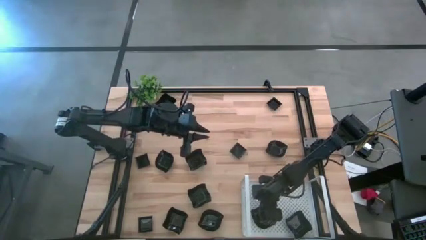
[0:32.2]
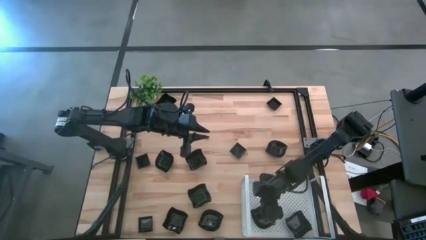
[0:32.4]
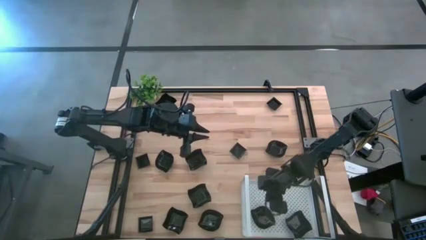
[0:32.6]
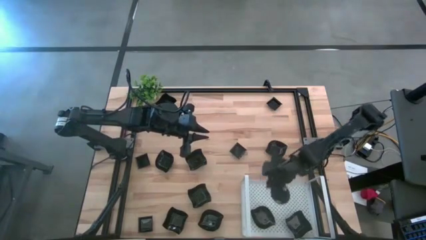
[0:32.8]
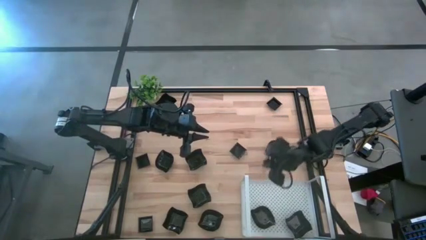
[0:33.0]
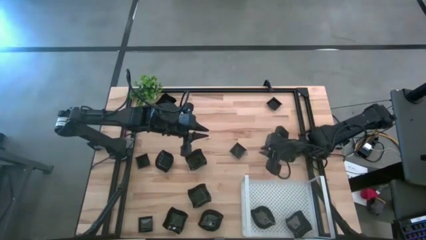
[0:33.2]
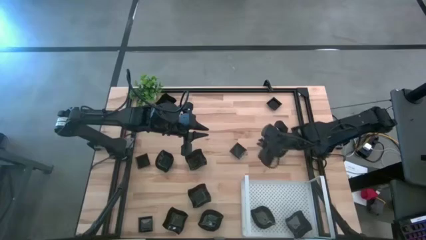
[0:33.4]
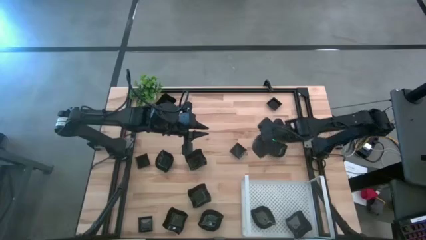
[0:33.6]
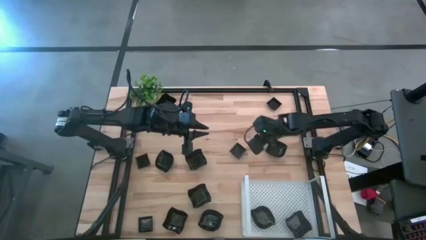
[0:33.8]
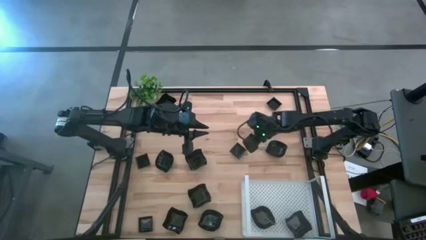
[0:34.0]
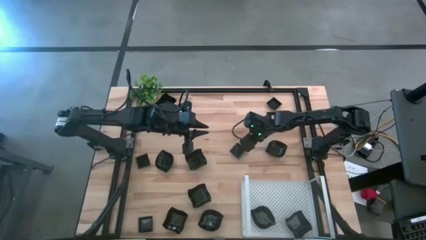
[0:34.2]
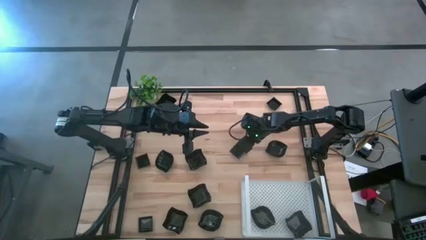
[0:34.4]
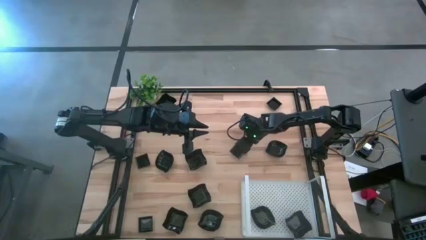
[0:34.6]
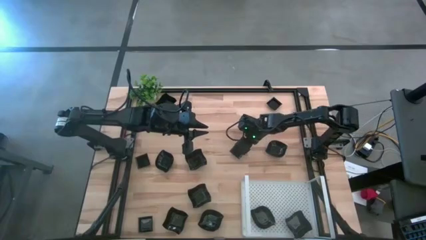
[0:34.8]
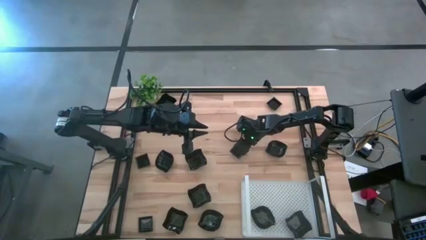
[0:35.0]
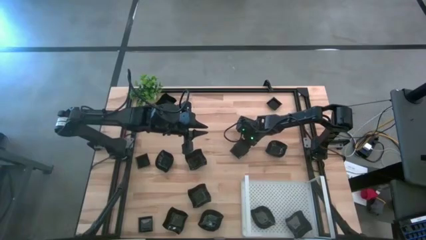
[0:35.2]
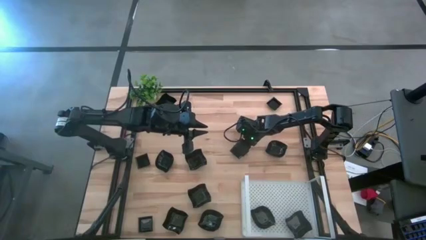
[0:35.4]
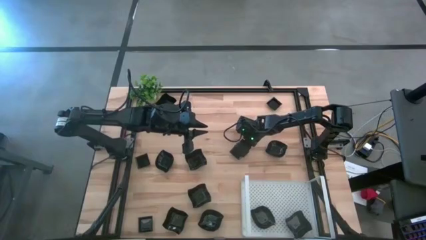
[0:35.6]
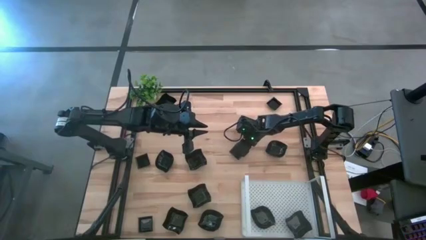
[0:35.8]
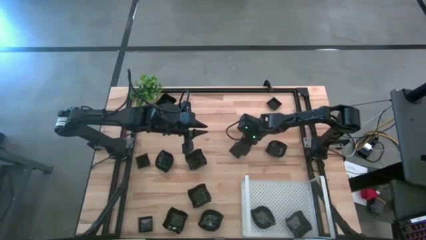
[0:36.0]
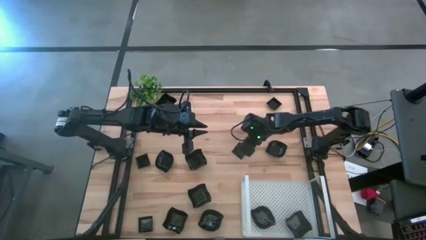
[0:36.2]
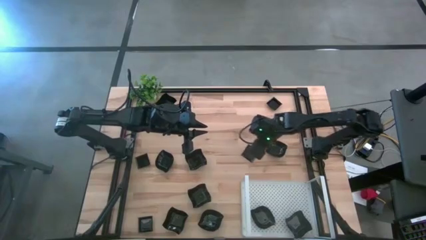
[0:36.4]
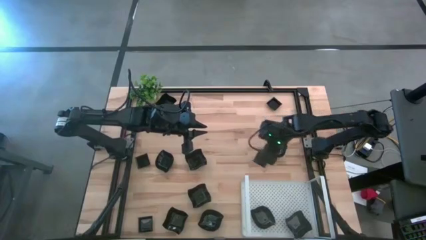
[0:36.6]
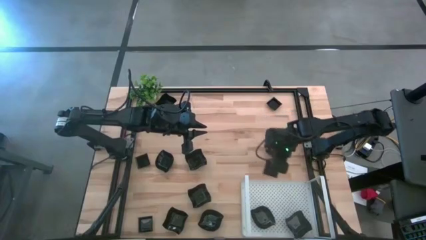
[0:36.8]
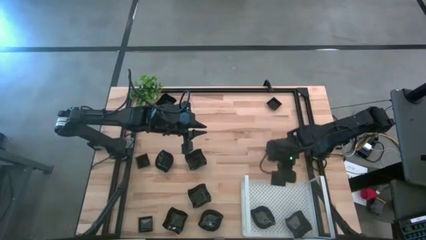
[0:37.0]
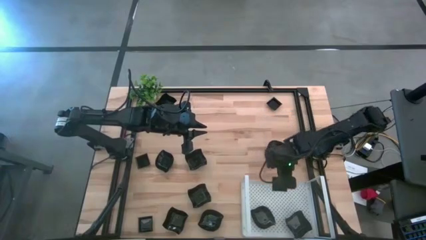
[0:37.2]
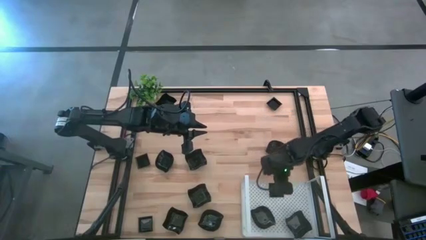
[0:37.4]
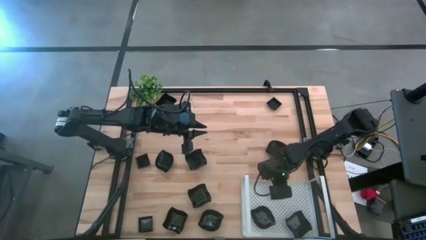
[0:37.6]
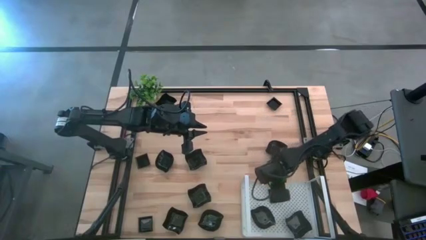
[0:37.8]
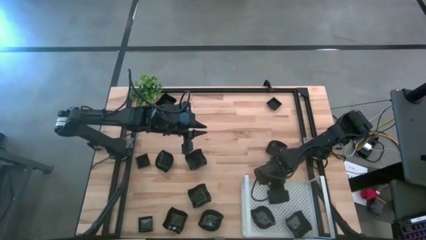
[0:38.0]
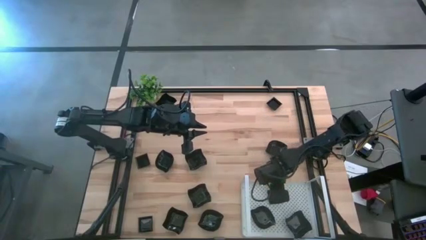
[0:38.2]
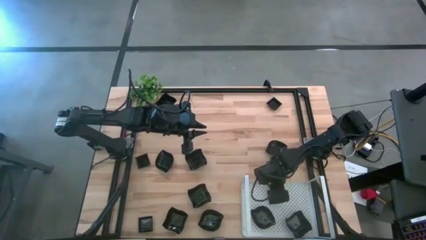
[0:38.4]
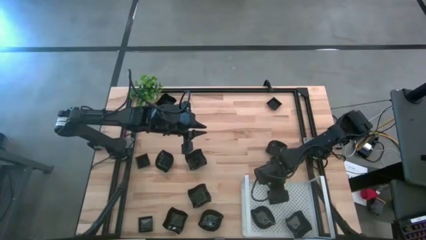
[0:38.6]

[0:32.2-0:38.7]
Task: Pick & Place Mini shaped plates
Put the square plate on the shelf

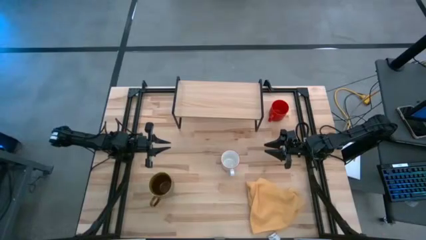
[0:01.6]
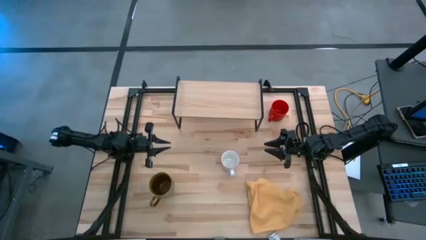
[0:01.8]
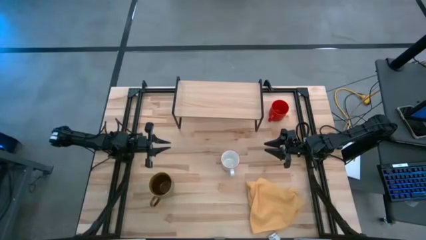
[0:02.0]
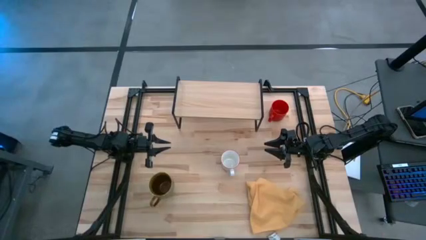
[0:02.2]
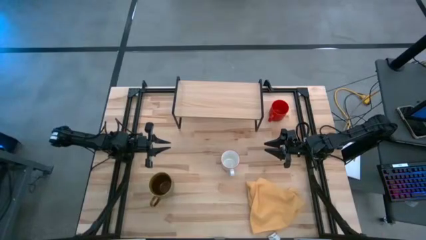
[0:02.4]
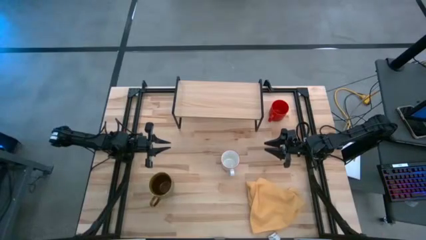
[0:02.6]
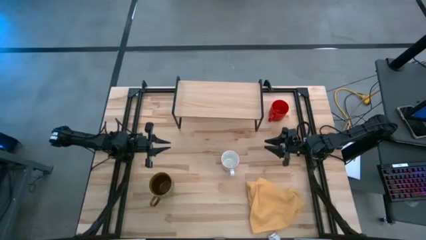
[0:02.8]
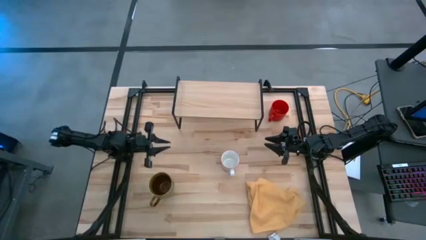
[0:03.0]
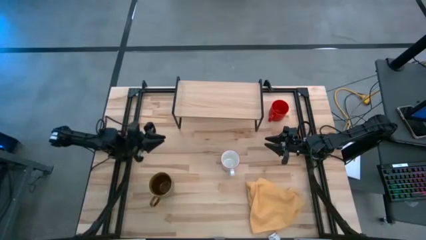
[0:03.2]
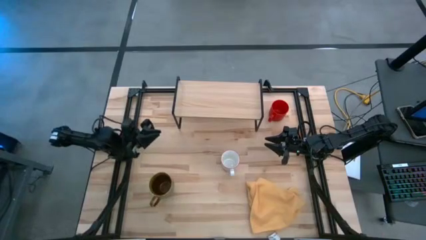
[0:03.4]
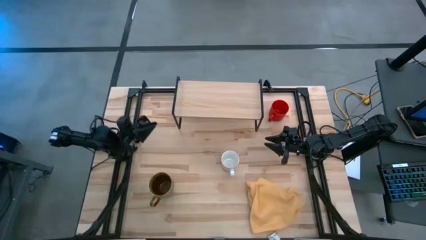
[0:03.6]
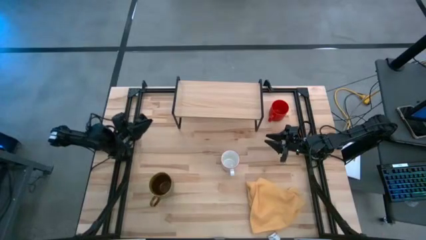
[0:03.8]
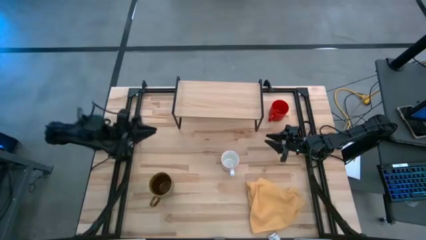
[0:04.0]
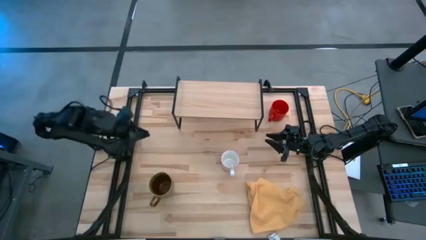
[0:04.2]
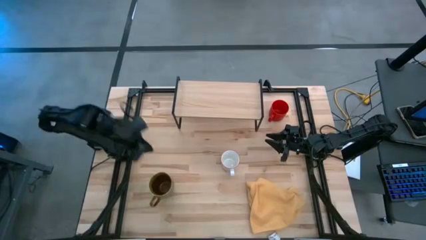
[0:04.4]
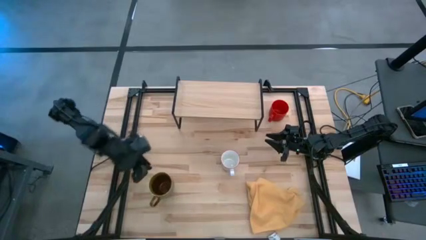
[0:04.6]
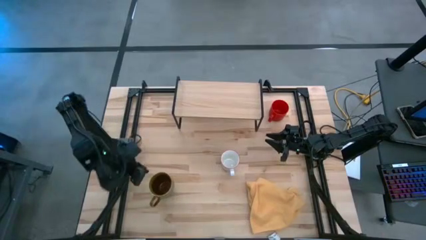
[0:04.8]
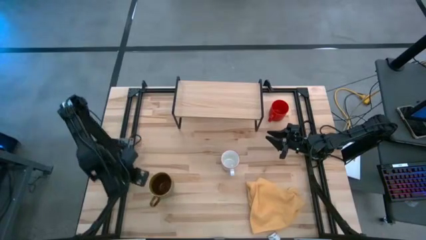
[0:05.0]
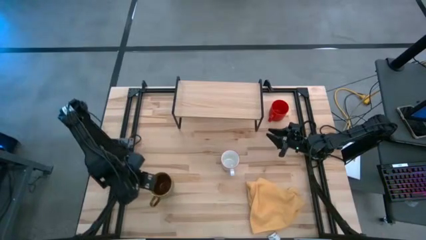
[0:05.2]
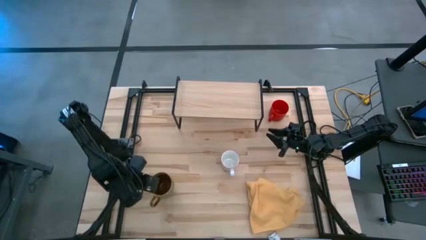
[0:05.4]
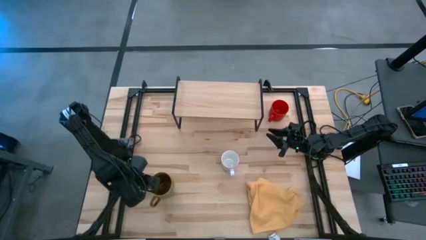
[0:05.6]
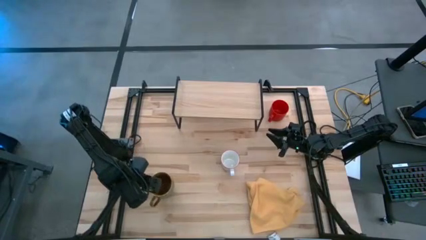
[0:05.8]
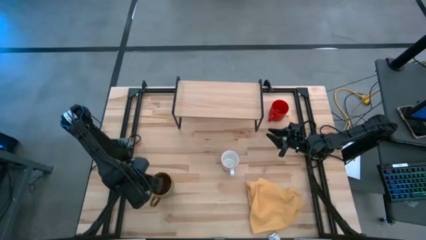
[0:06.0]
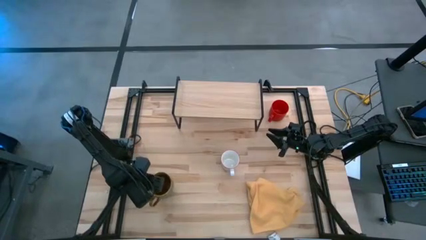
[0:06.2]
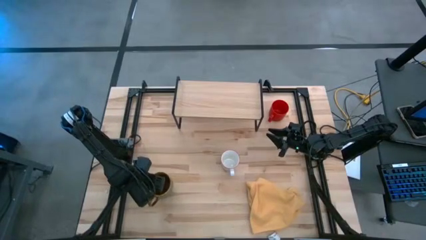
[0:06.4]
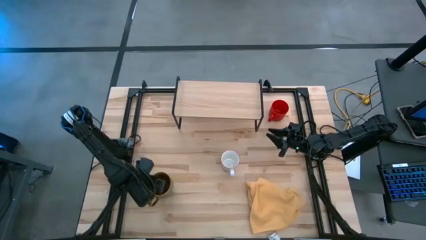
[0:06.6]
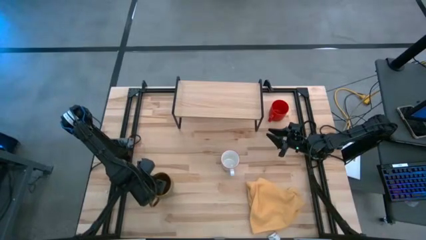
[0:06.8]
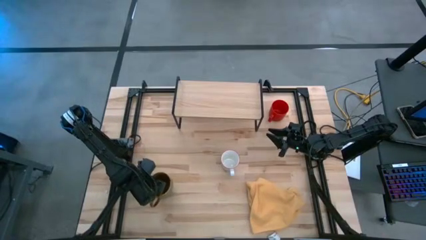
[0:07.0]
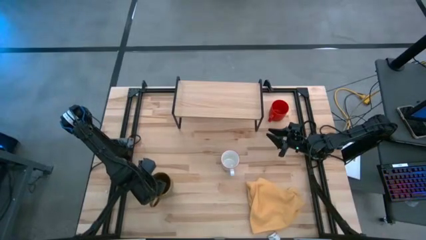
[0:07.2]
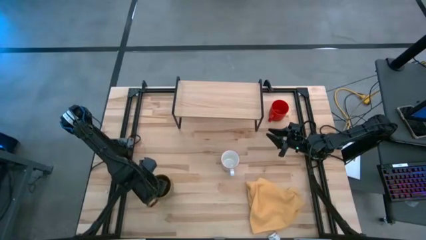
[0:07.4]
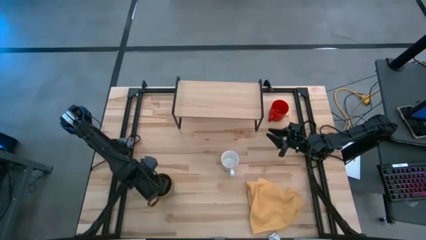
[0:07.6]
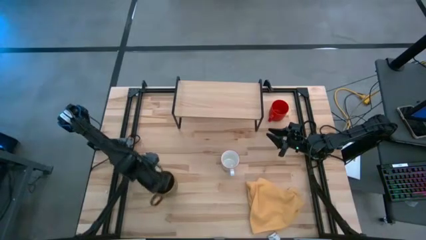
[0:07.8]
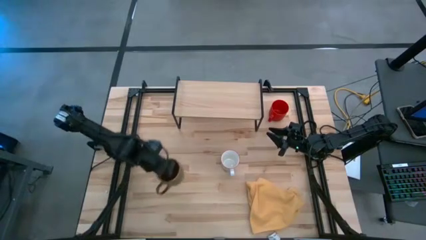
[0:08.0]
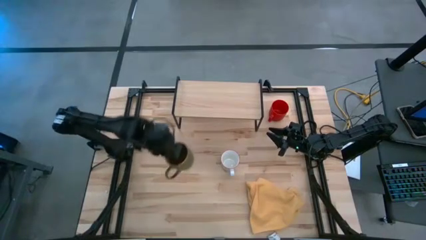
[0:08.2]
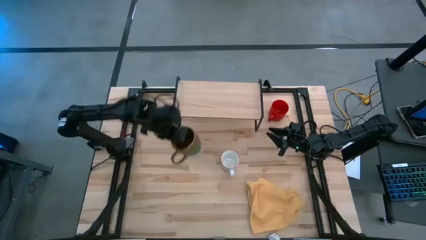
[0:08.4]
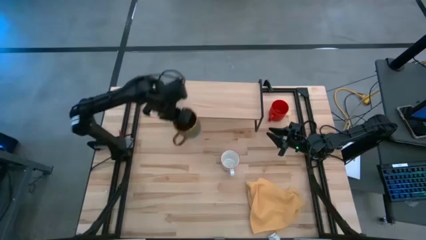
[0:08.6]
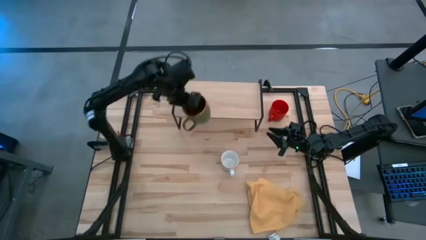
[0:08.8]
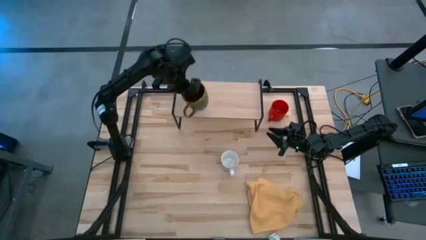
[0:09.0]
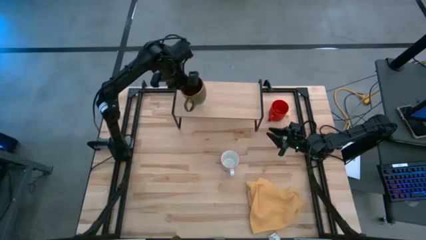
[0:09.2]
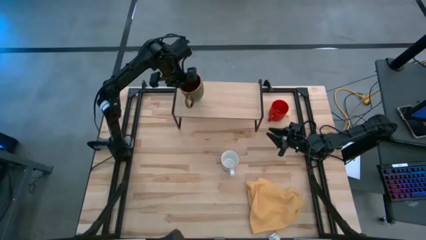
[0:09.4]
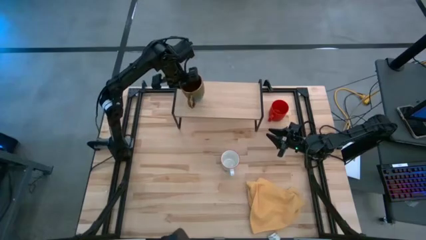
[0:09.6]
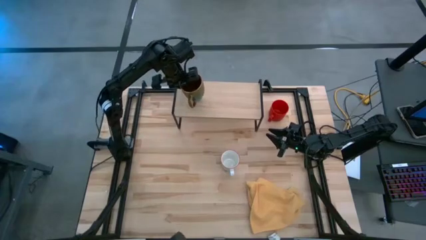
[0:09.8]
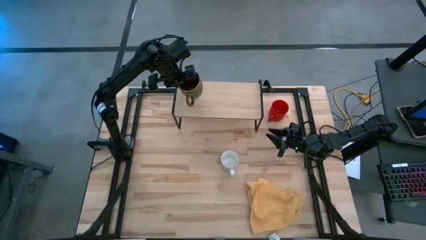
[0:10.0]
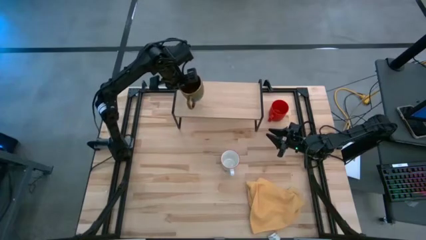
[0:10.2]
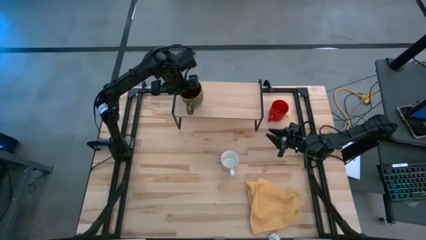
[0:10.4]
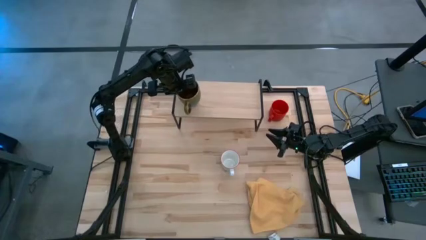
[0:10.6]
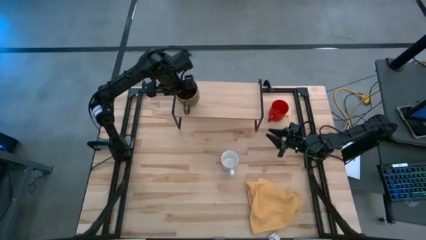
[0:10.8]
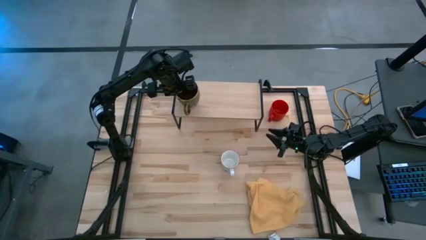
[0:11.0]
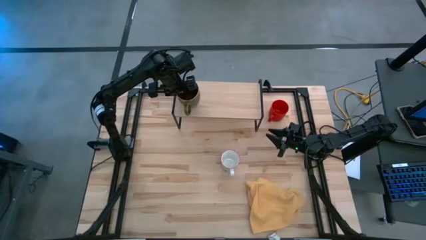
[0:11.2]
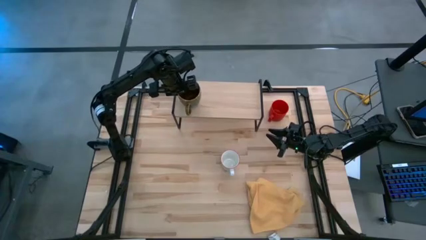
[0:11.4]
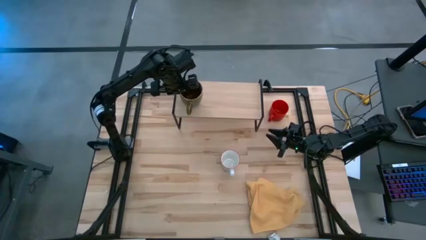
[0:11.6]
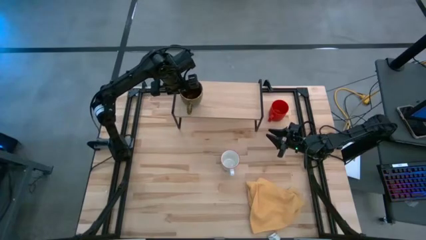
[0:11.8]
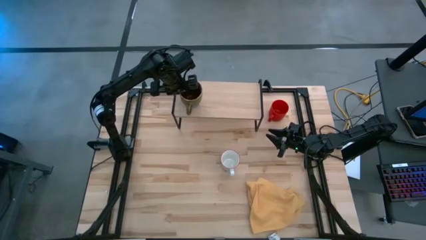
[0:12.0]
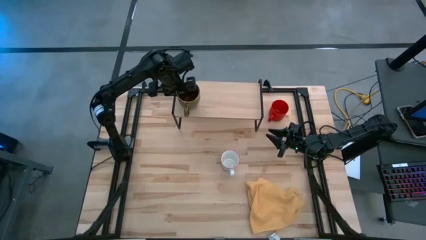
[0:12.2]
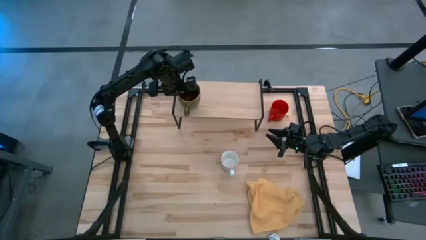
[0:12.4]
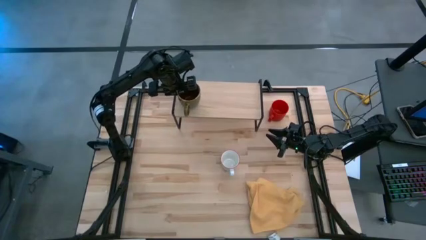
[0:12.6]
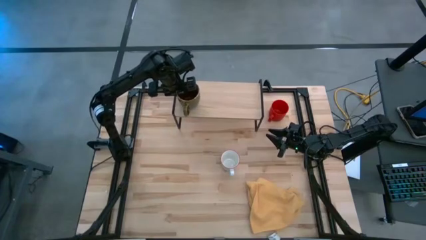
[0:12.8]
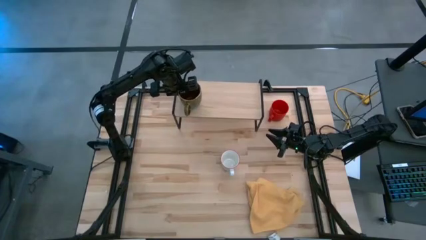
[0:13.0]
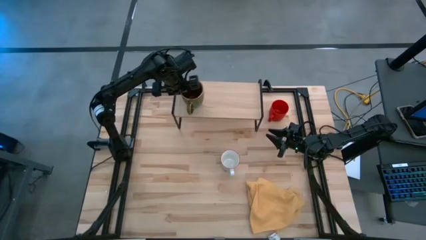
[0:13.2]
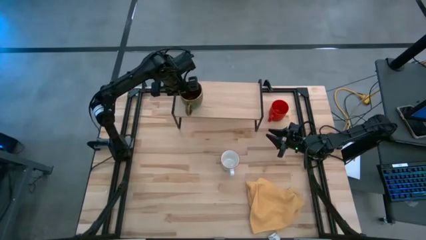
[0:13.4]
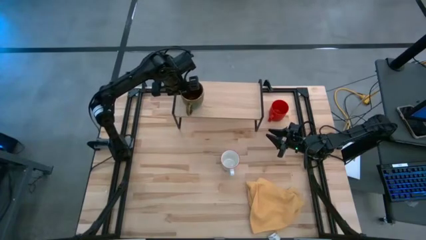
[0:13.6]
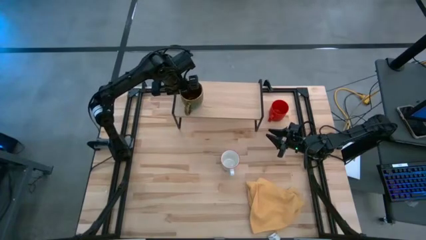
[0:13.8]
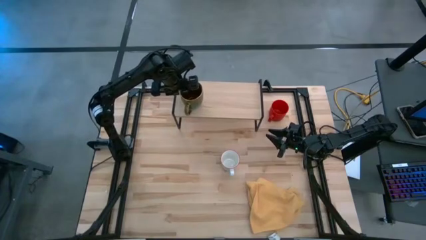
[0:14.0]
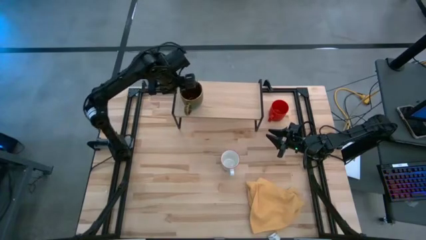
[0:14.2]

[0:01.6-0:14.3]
Task: Stack small to large cups/mugs on shelf
Put the brown mug on the shelf
